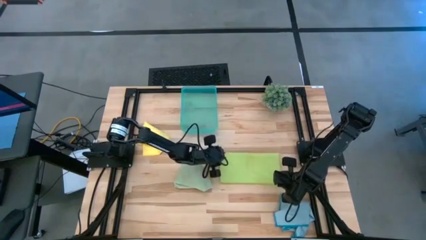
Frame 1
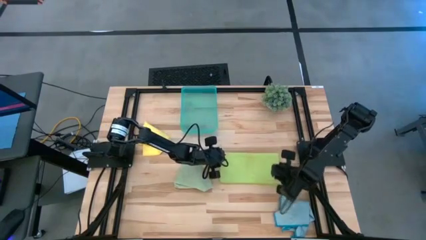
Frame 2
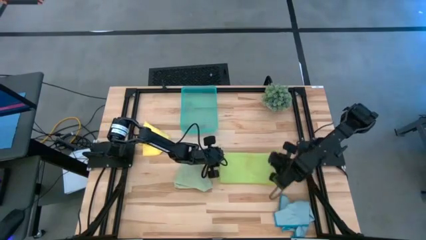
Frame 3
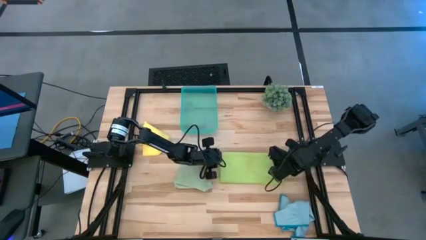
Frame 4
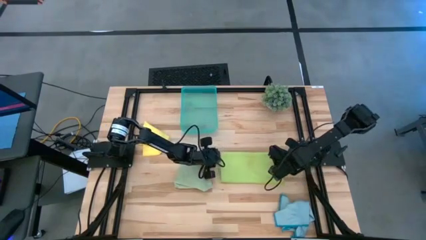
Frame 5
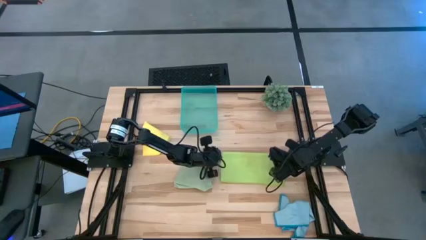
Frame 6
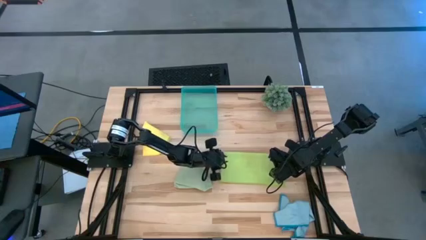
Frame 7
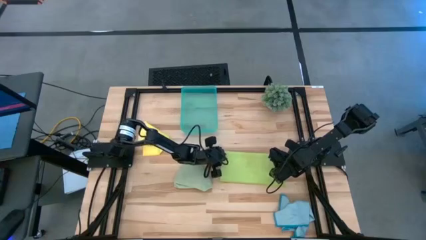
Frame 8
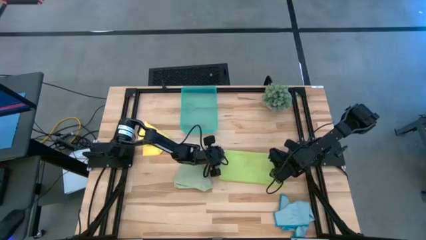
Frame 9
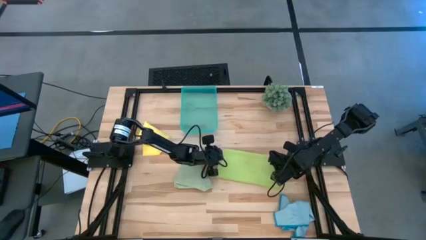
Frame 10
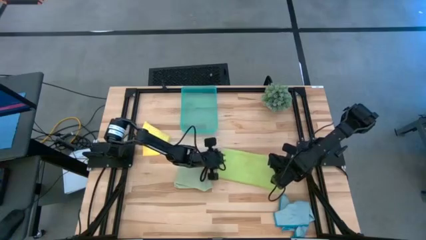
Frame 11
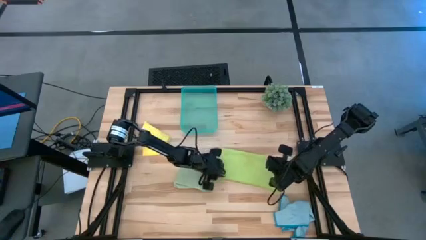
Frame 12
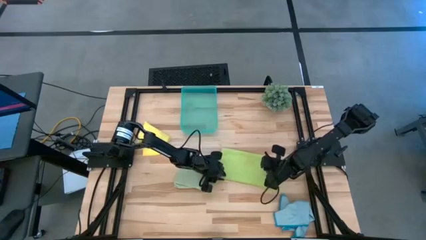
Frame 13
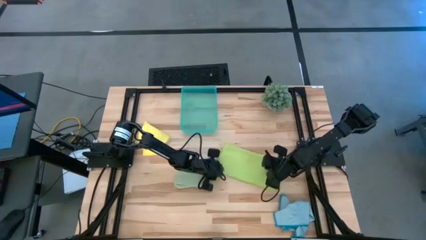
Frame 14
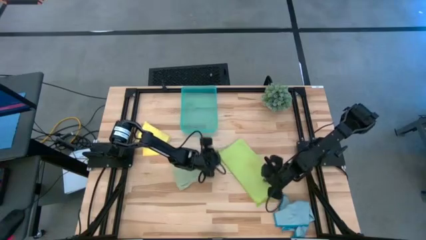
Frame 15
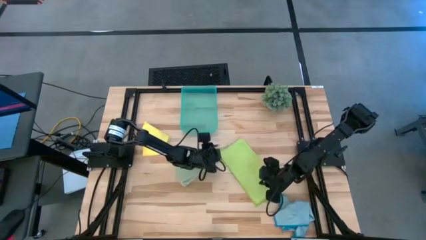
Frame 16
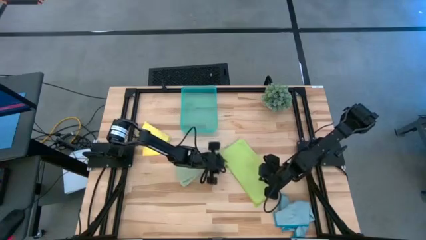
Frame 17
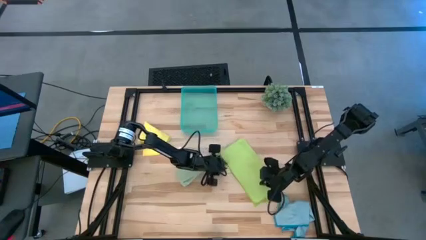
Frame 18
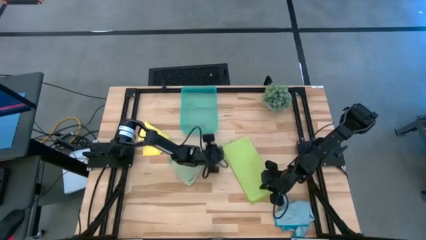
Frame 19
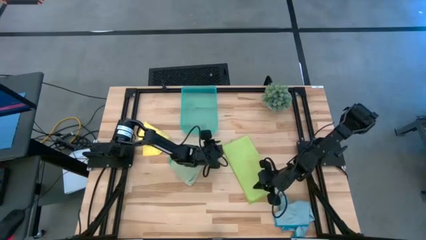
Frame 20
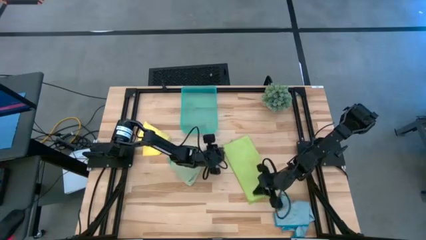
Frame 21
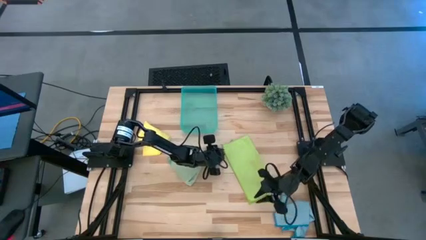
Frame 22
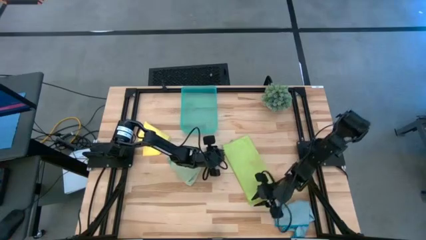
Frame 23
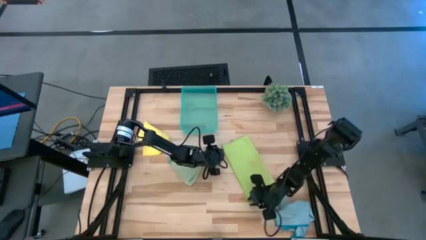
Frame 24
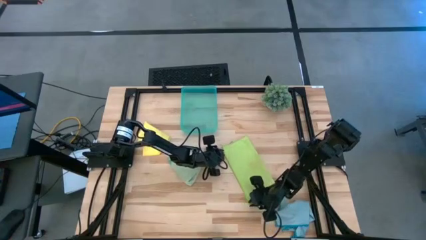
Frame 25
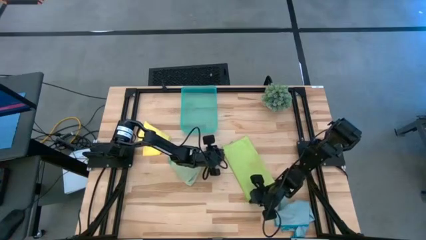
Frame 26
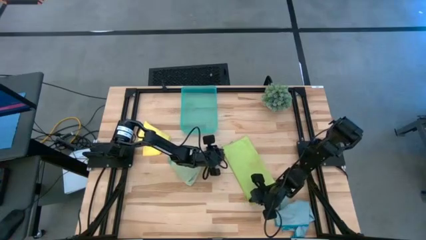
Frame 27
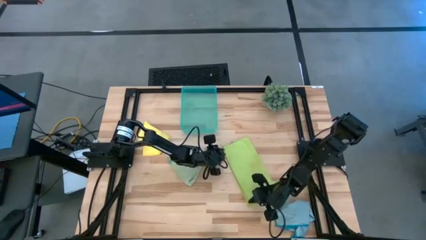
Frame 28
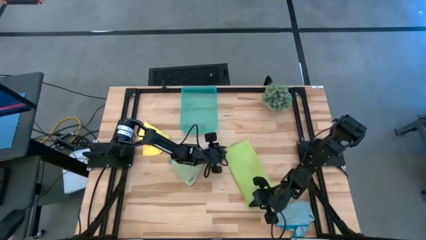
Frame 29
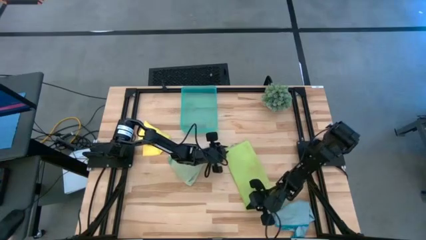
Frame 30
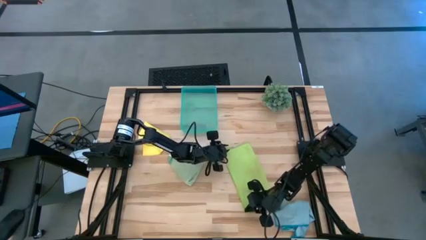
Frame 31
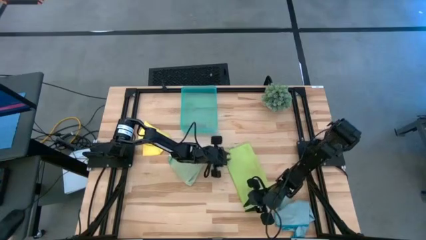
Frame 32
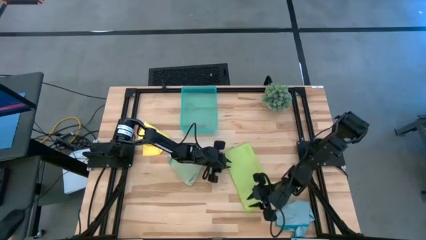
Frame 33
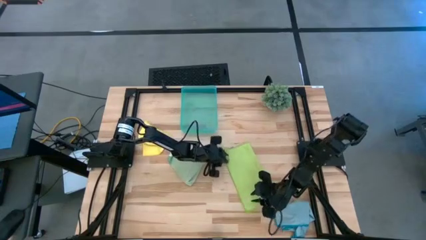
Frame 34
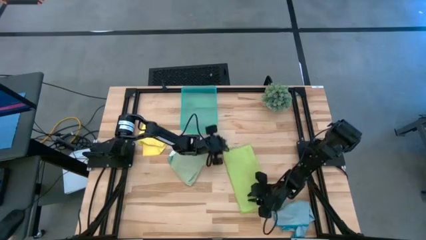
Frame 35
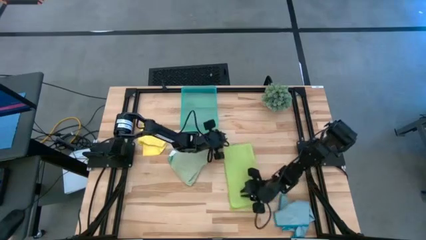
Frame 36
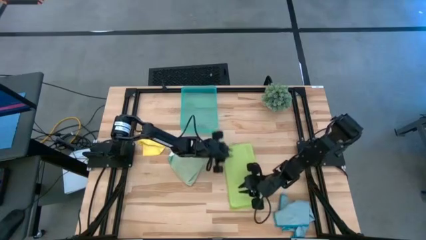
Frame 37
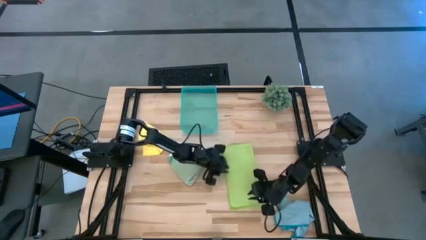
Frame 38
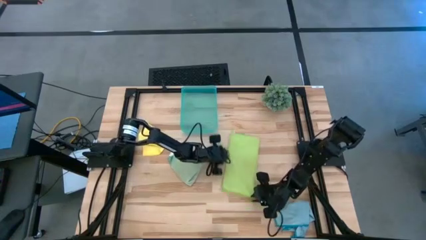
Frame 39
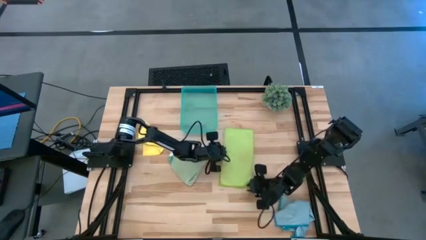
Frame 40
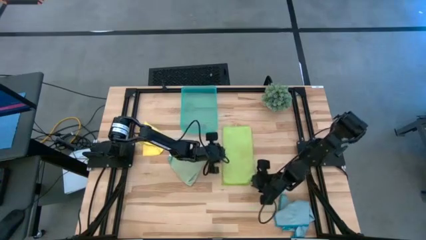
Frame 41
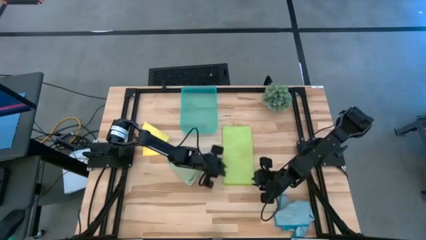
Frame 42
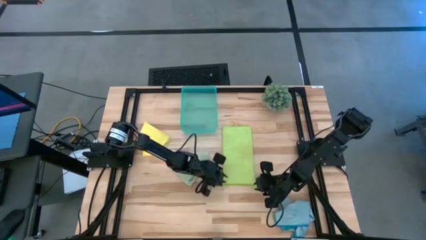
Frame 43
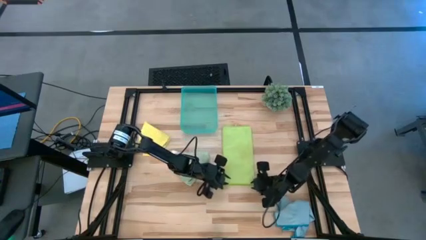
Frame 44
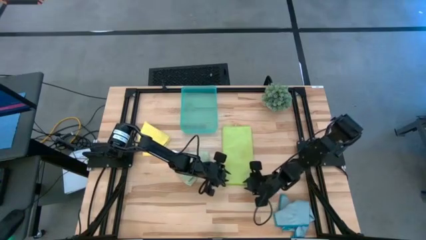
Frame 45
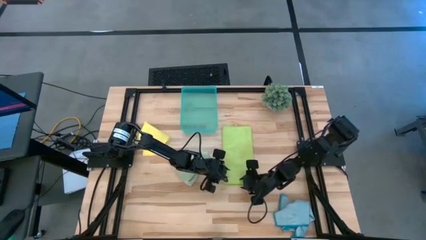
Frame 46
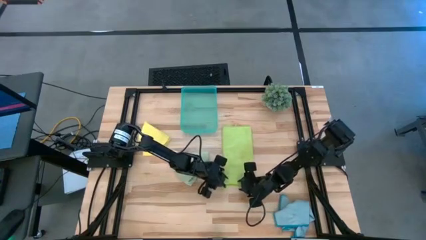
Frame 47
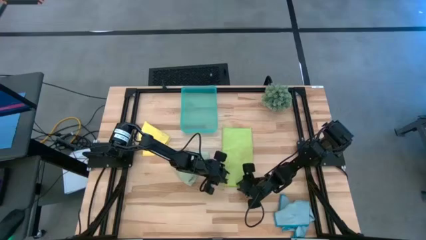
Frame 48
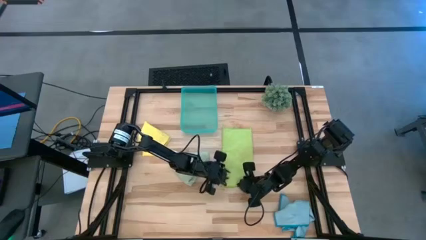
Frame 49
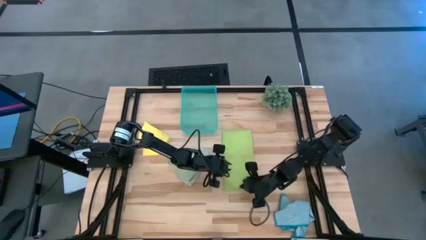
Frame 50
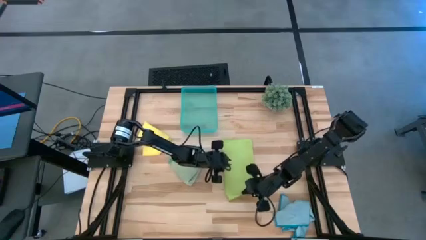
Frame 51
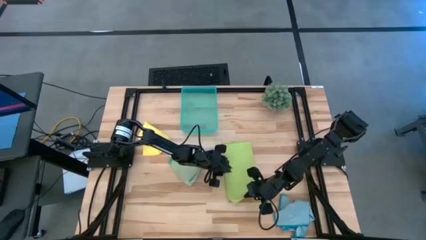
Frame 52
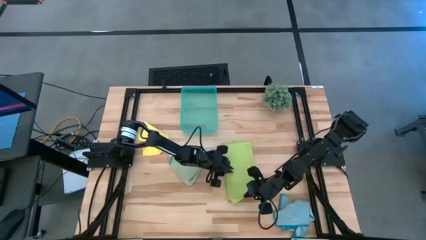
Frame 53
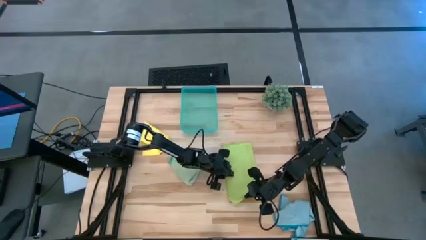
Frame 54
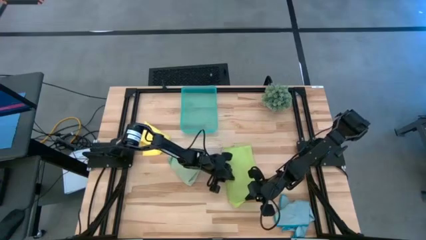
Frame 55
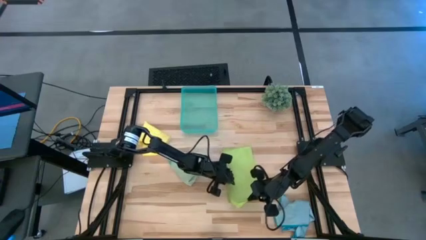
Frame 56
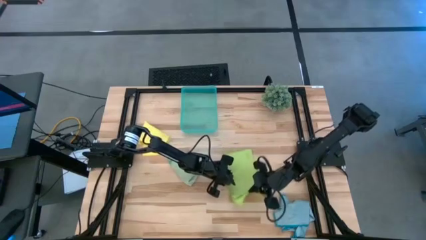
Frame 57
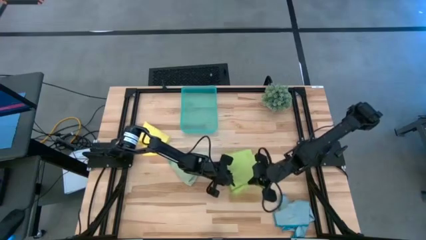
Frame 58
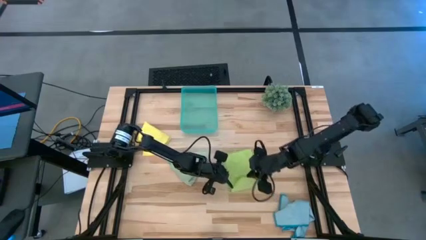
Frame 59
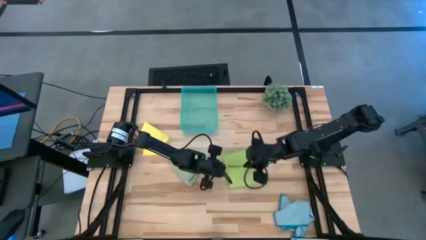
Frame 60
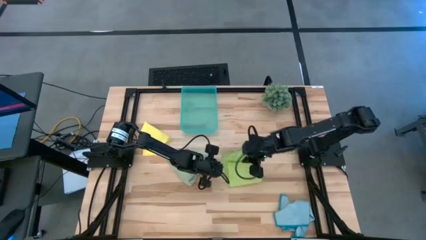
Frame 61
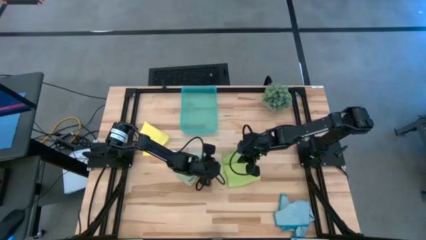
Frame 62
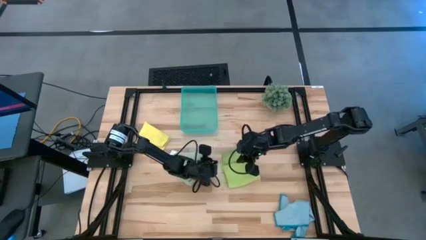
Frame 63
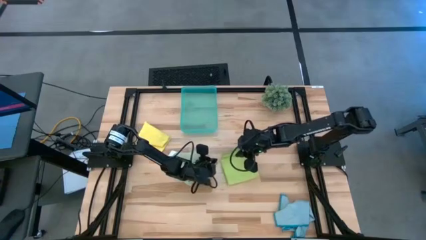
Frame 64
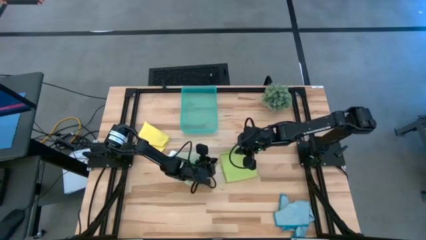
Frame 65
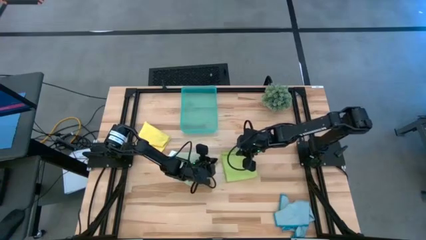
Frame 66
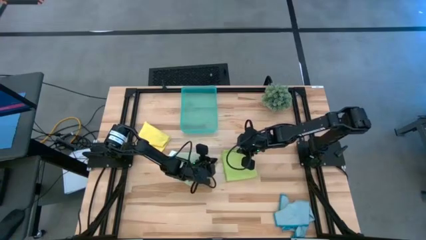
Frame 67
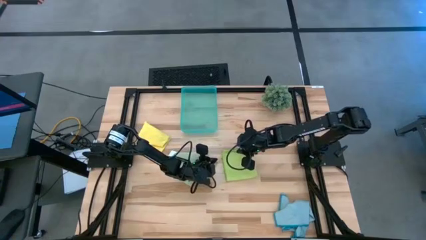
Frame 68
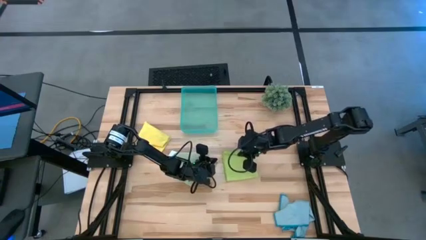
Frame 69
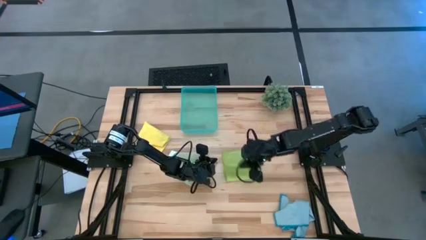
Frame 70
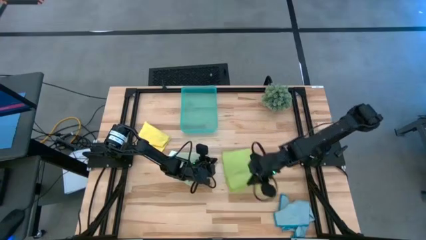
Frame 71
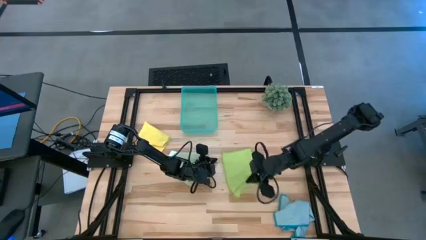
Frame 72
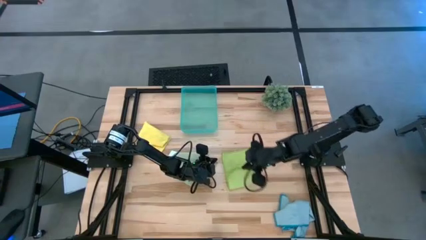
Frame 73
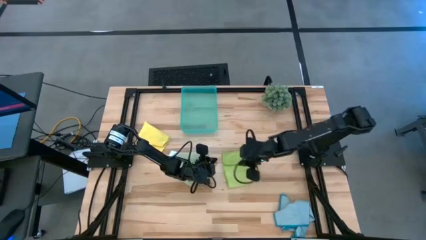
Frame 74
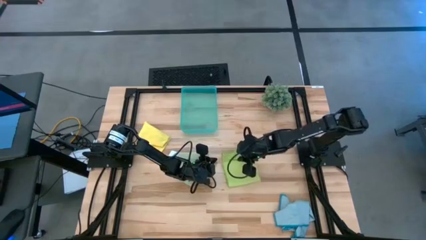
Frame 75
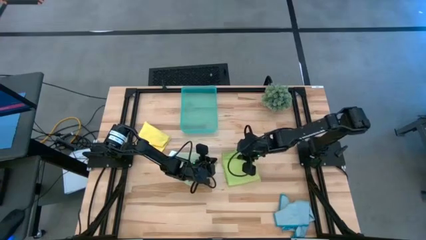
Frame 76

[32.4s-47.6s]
Task: Fold microfiber towels
Fold the light green microfiber cloth
